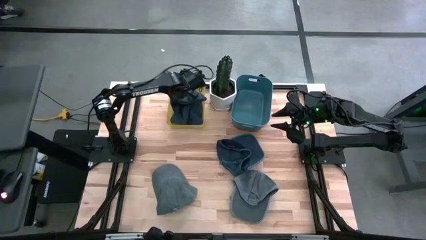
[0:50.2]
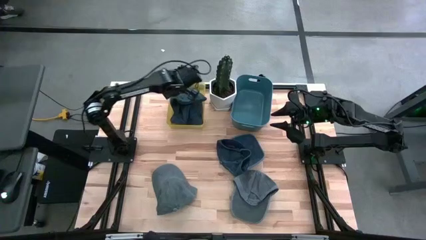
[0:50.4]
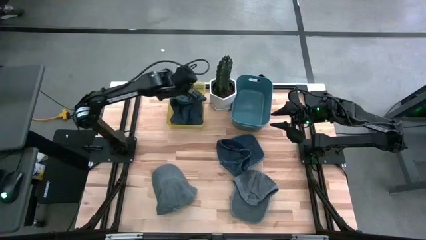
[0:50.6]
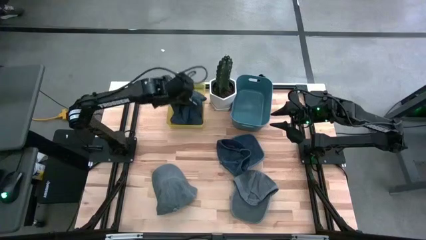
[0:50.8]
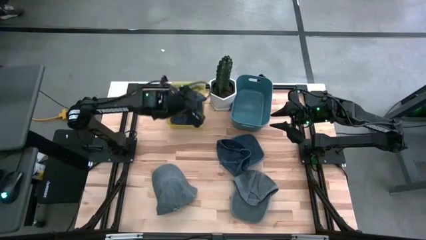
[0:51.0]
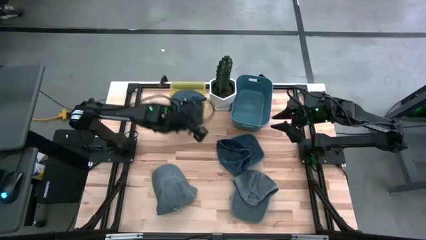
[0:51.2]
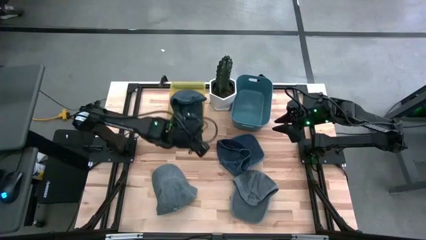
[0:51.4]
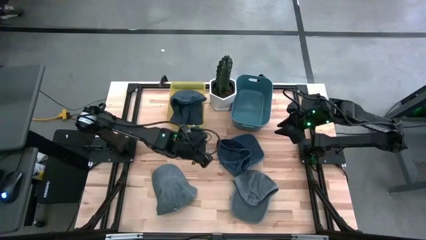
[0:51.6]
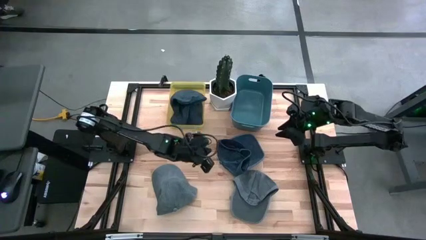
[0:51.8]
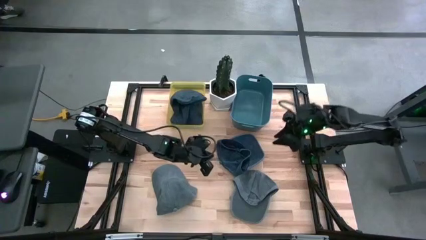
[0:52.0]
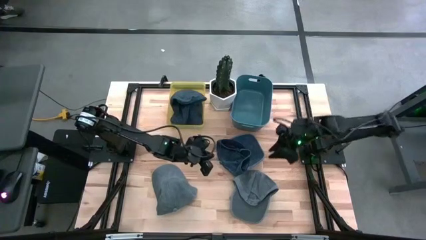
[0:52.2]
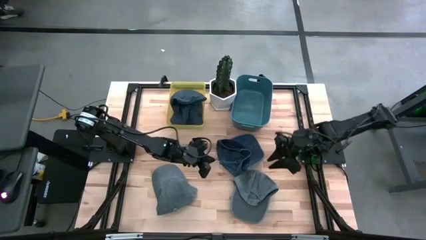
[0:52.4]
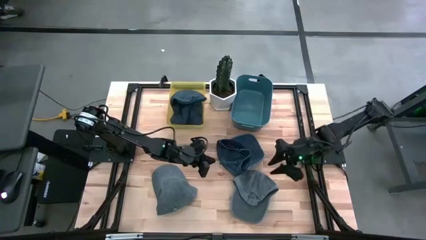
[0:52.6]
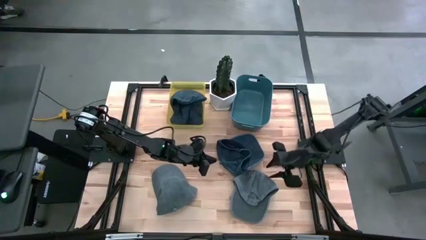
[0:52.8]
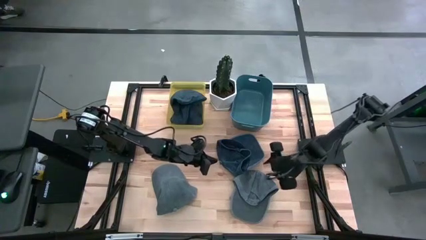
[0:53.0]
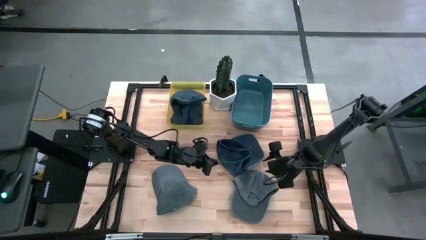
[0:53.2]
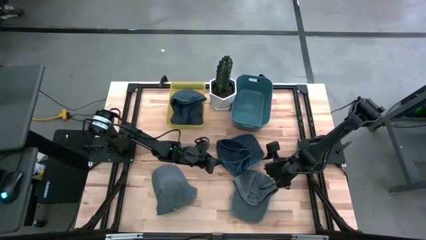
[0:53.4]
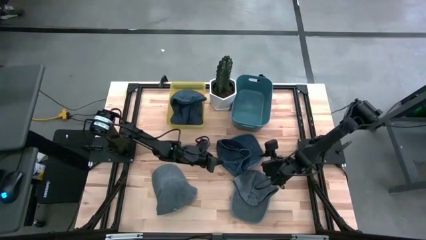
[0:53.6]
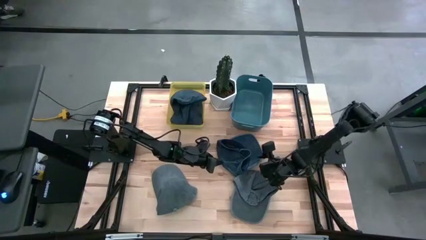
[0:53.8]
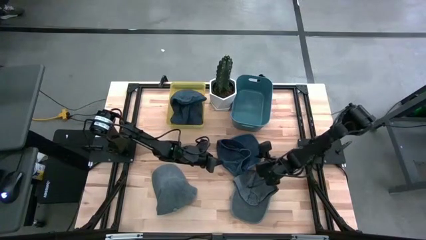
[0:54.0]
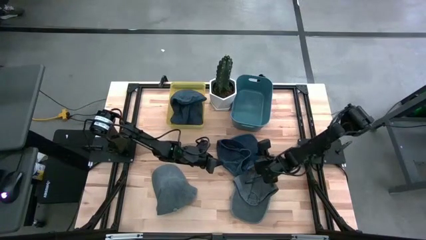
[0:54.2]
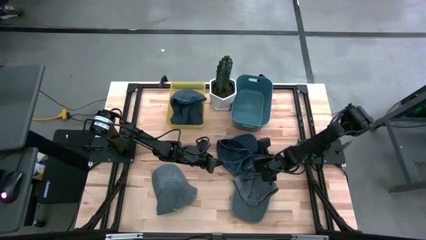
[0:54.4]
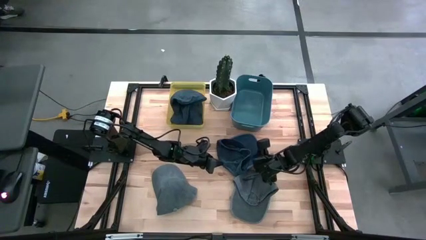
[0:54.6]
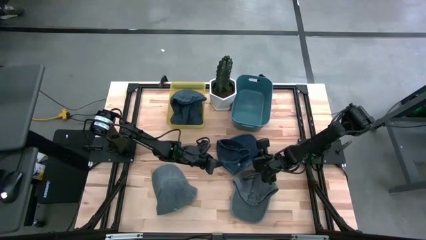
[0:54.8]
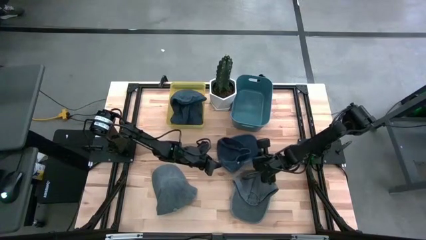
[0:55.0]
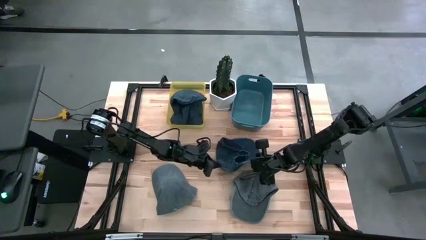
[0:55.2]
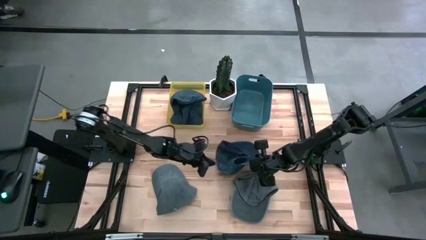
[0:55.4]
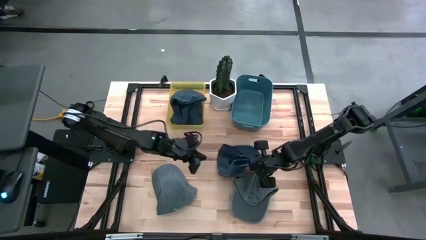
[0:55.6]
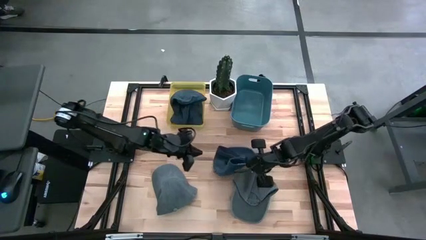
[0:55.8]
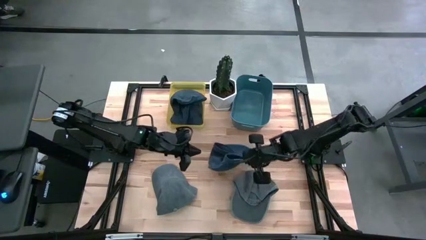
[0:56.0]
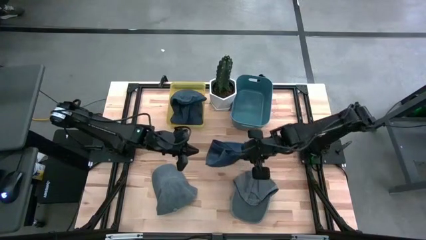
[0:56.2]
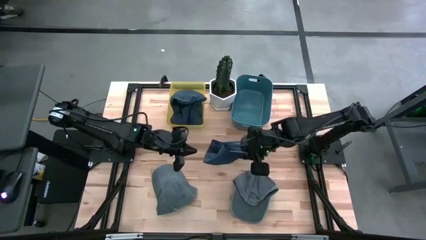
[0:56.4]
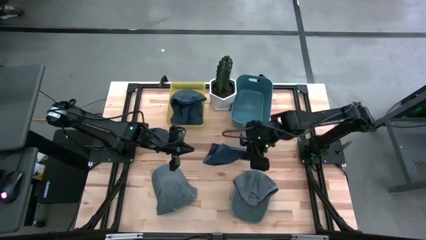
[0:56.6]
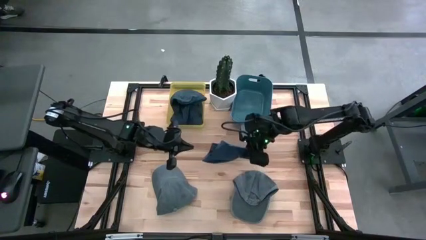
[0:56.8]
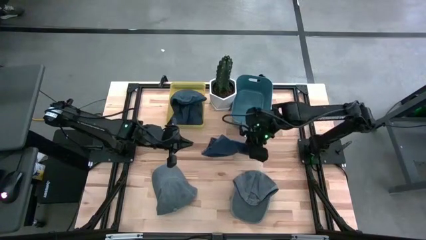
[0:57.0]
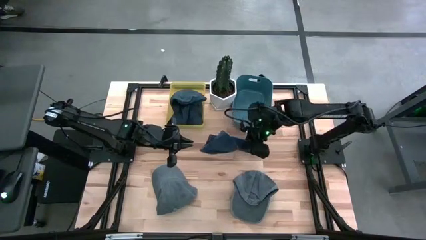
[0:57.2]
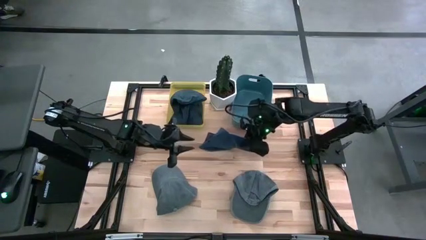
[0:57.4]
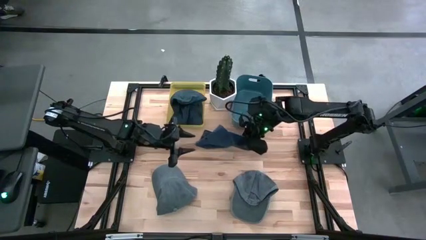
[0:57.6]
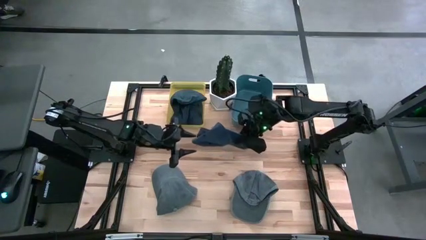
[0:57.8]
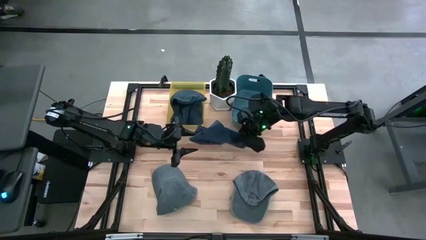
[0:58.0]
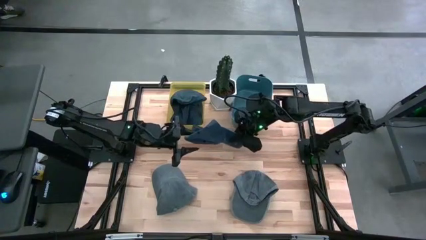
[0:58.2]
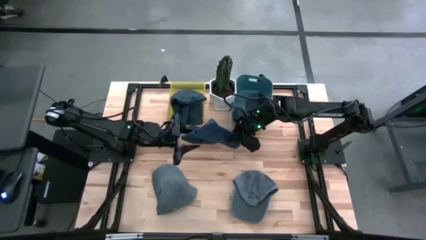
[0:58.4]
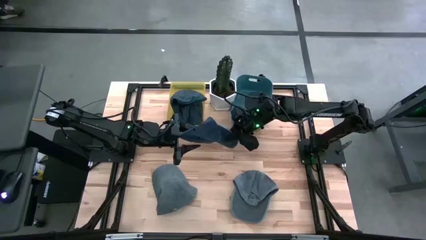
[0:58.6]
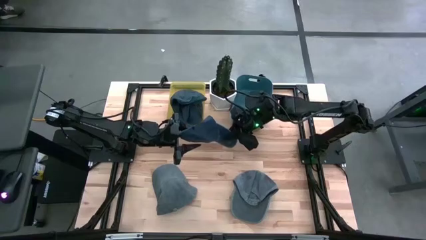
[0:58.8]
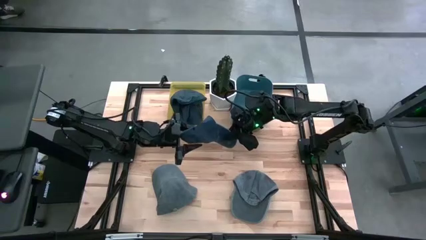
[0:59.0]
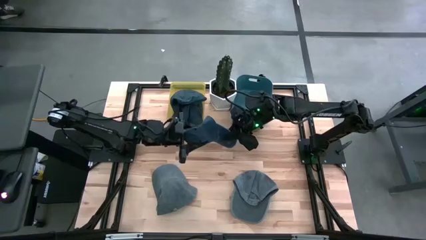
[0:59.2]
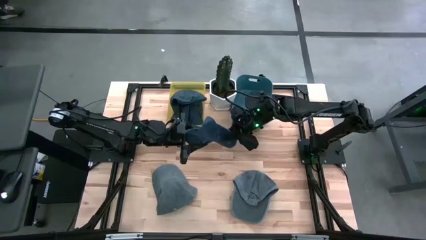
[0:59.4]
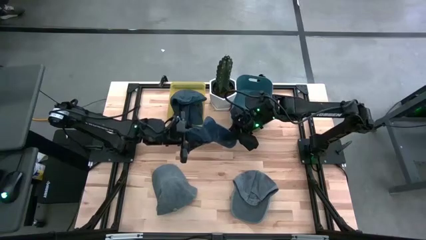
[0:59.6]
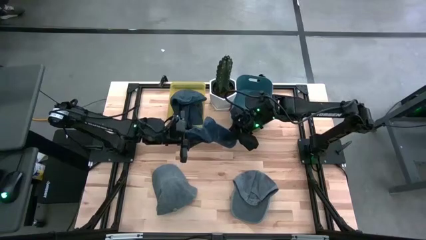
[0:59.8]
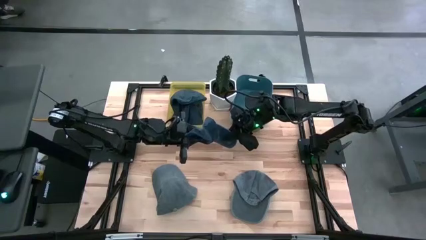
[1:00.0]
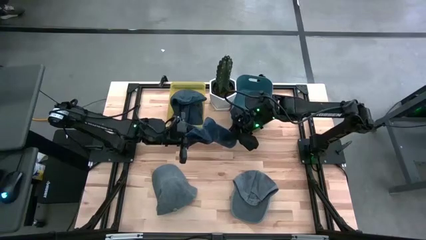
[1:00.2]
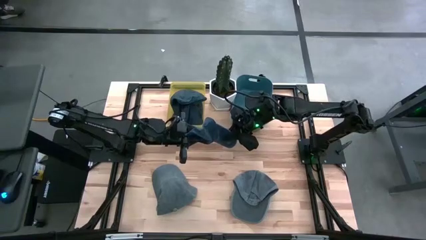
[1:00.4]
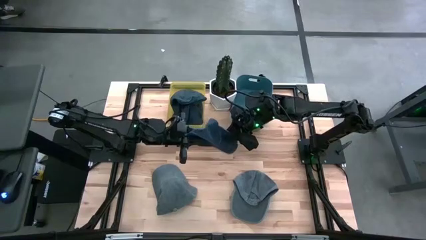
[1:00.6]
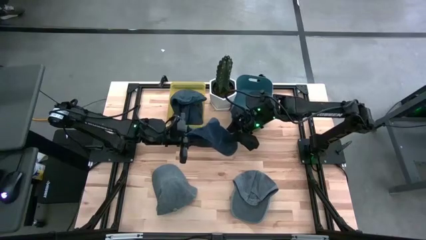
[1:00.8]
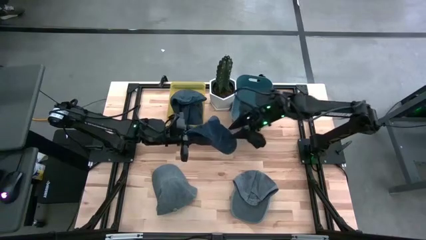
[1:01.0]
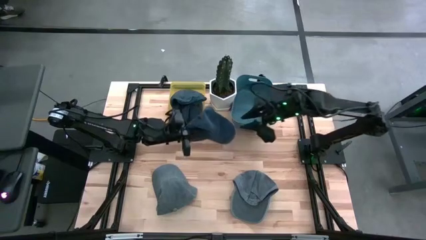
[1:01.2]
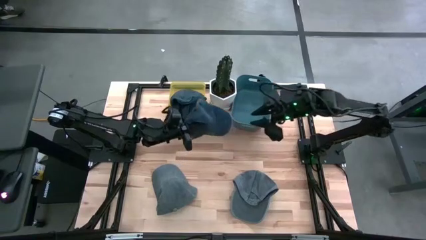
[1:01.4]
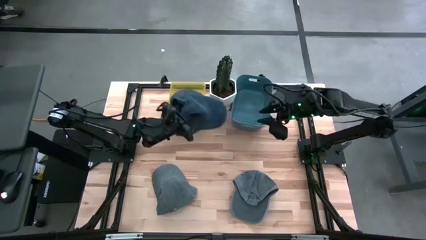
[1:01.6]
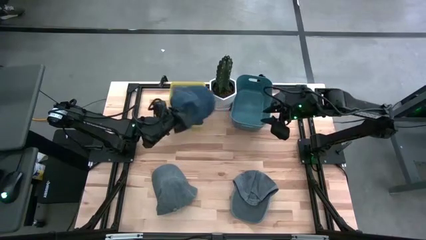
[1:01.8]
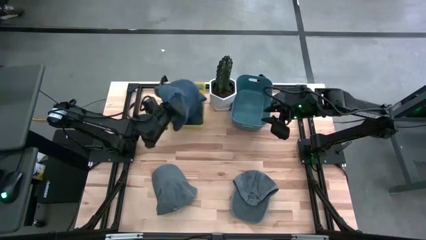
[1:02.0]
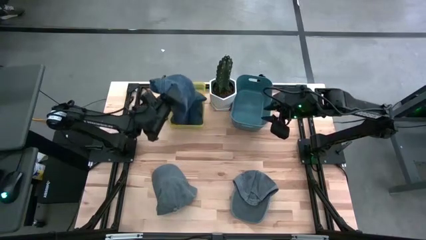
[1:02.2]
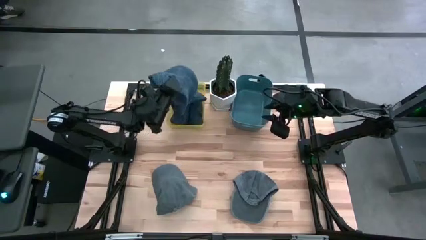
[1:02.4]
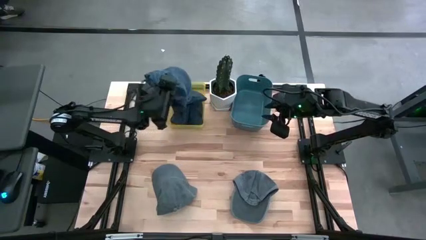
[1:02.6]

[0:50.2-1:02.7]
Task: Pick & Place hat
Put the blue cap into the yellow bin
